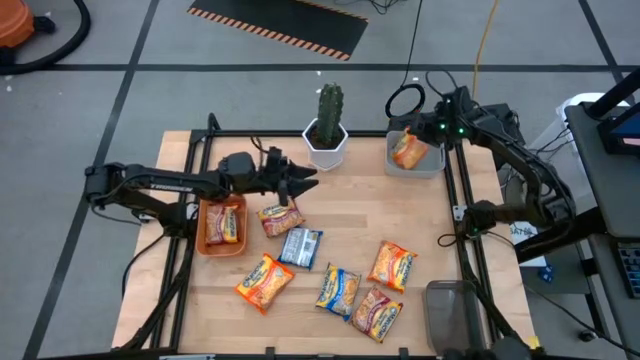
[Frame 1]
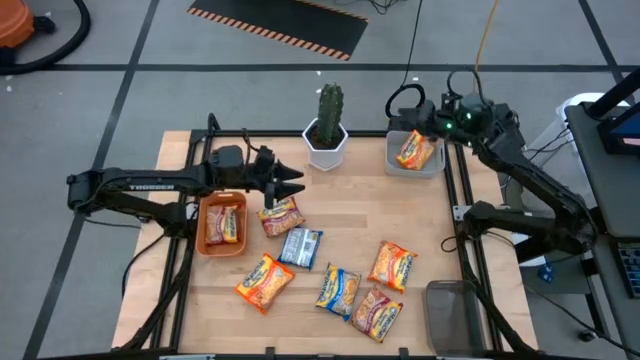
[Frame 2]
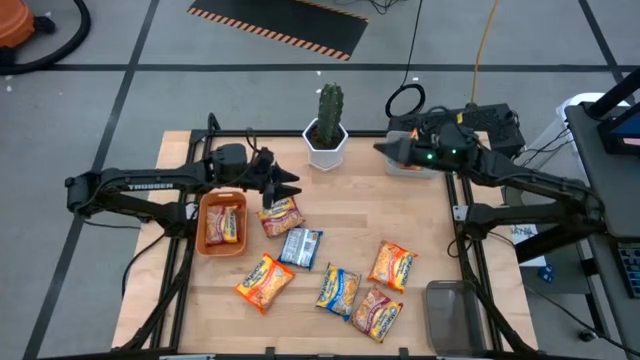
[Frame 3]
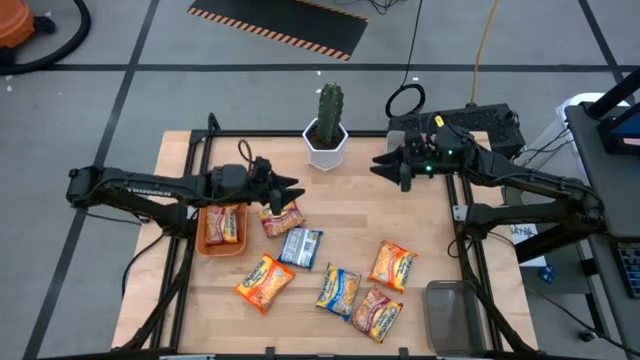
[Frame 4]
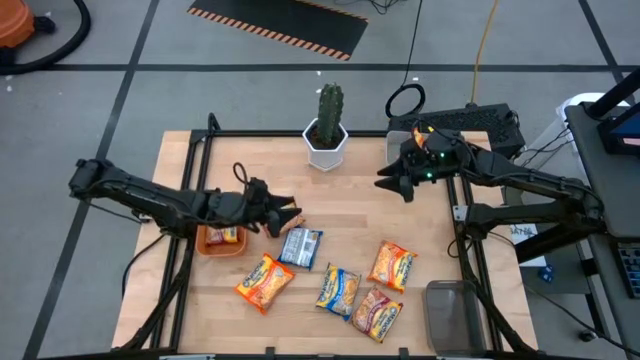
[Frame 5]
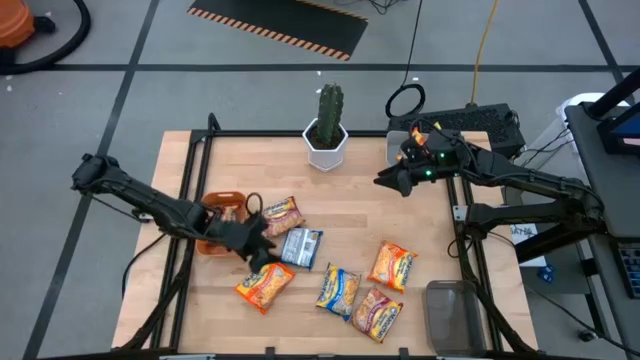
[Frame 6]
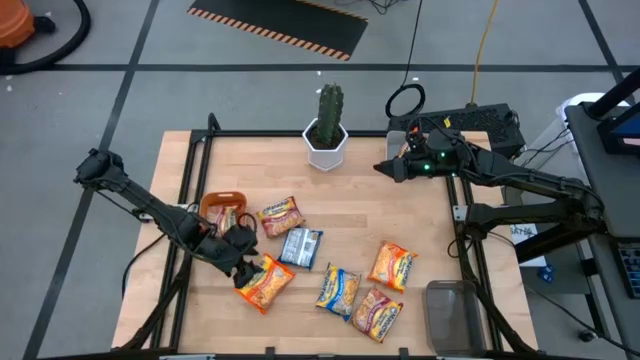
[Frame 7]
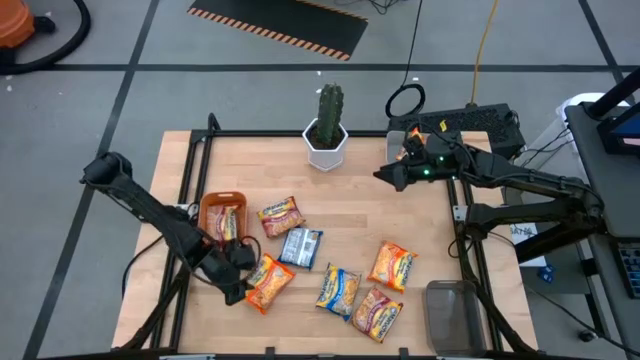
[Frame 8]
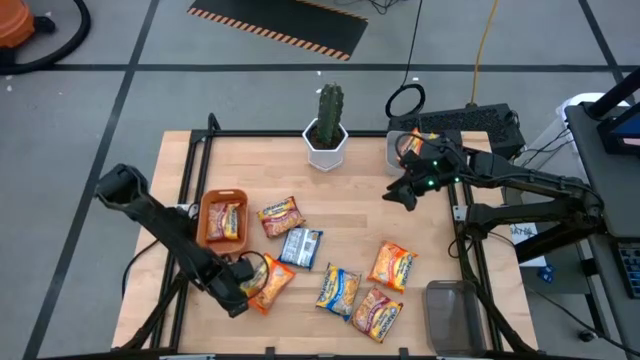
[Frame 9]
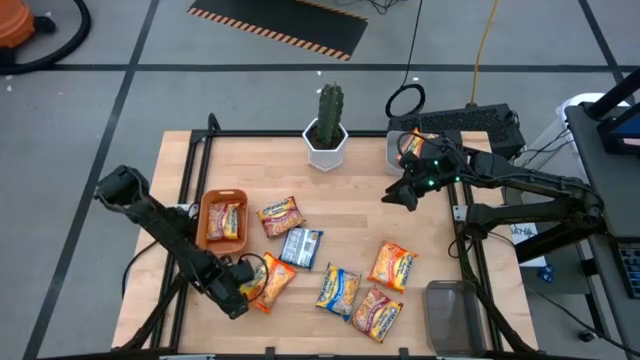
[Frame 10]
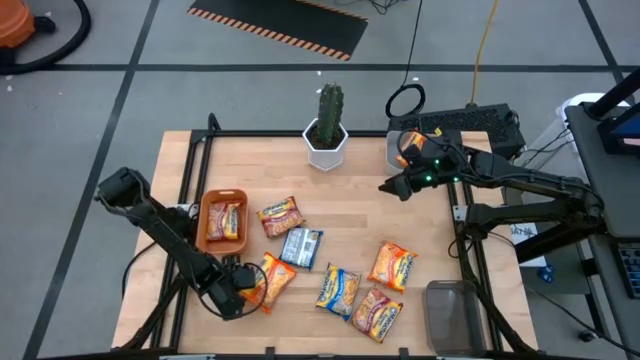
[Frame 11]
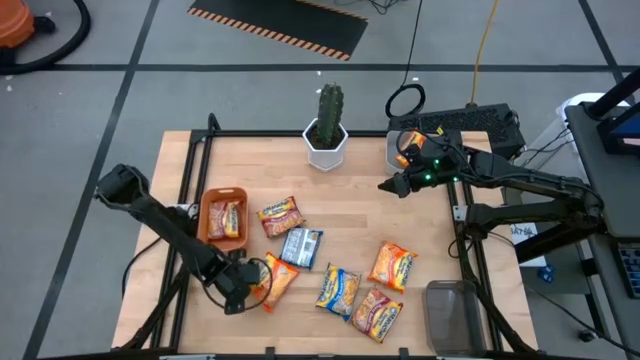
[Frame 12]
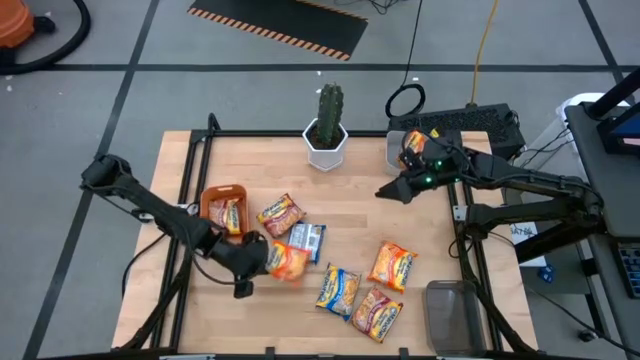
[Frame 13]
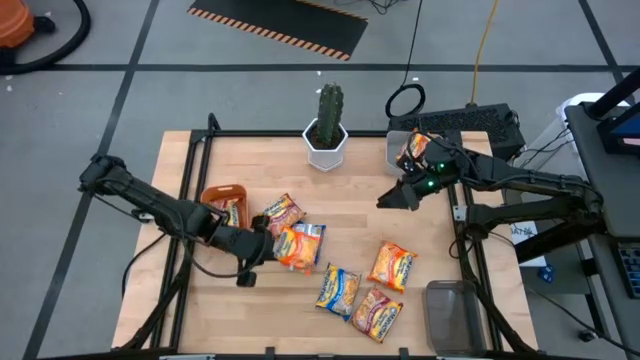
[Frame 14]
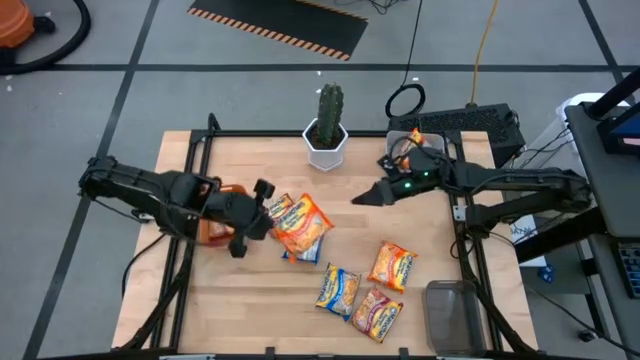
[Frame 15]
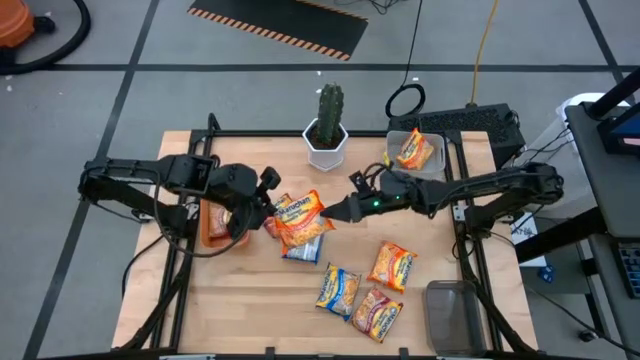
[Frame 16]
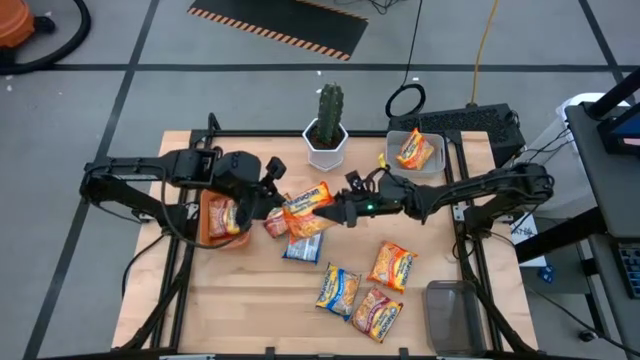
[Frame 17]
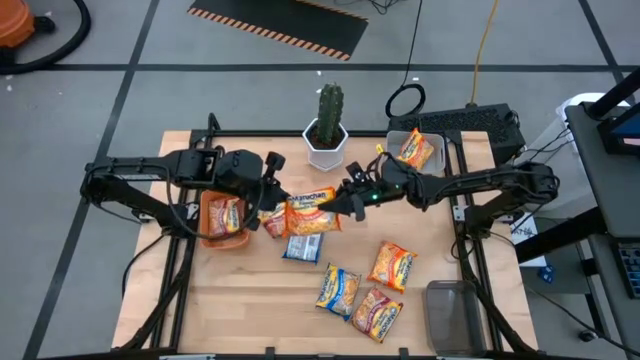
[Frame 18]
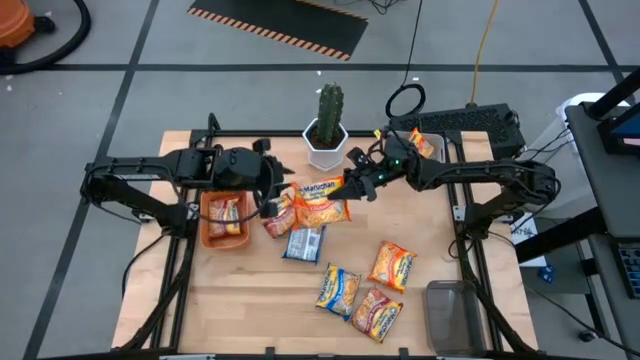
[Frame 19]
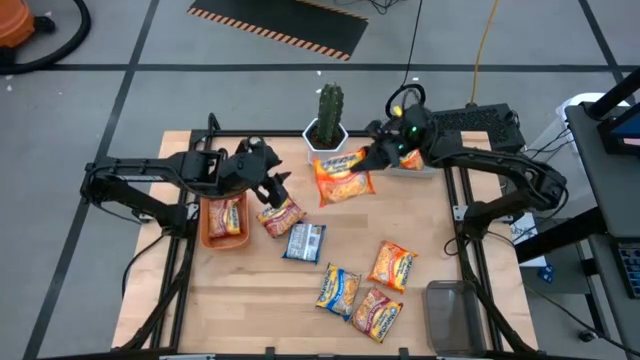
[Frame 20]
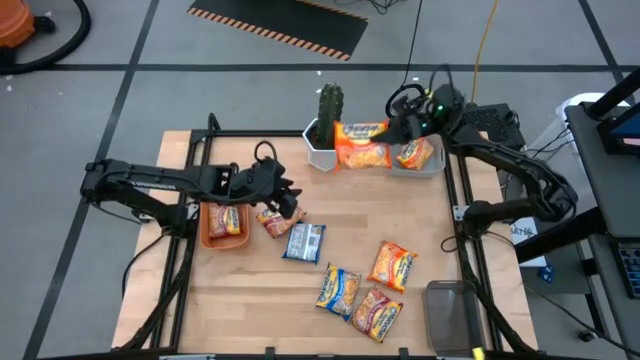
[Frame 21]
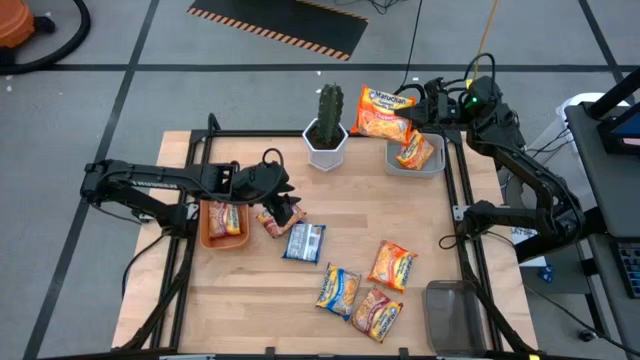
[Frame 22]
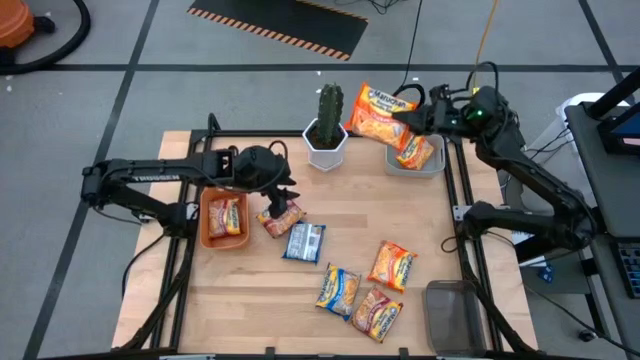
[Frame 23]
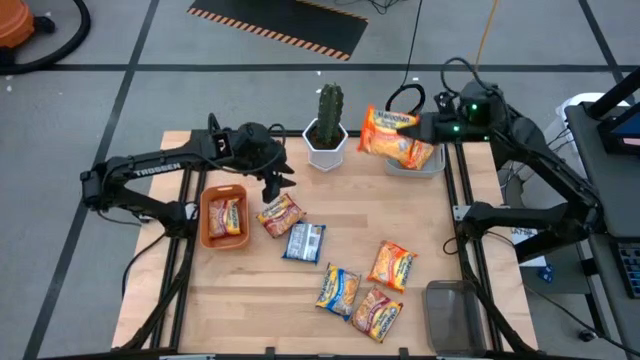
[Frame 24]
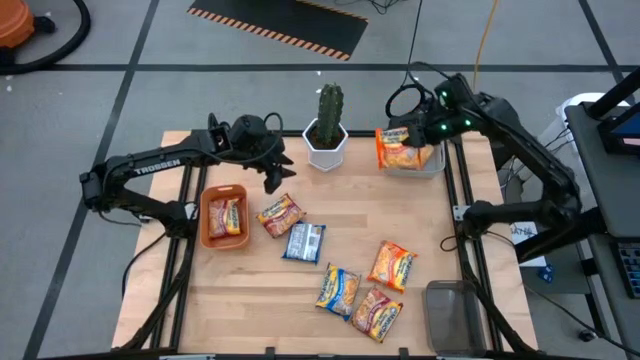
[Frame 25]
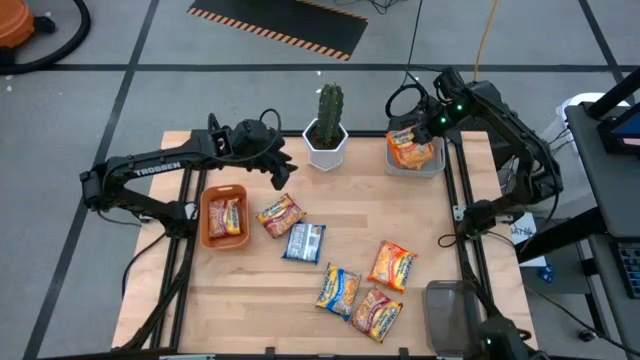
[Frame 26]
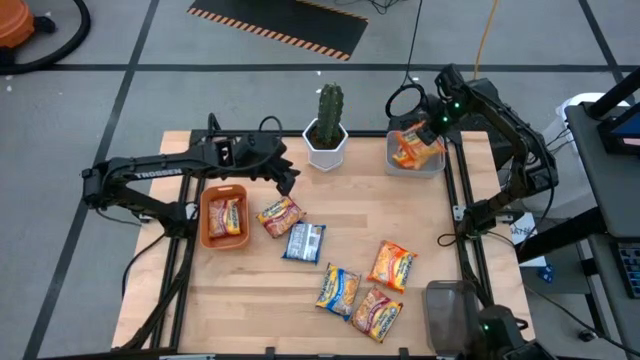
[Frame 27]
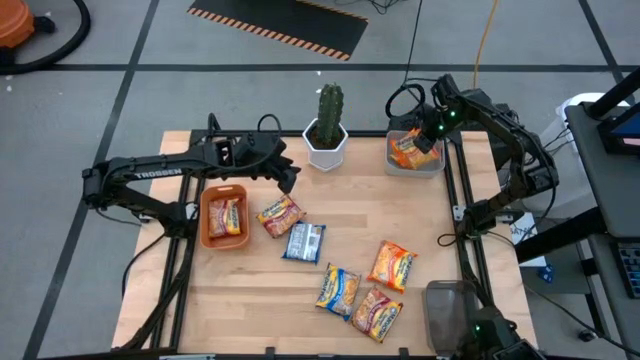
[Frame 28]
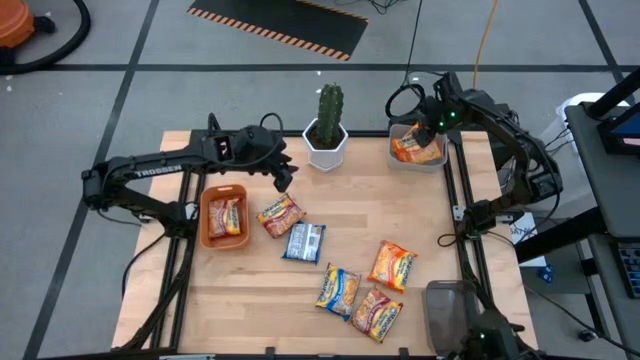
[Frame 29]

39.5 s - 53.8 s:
Task: Sort Maruchan noodles
Put the left orange noodle pack into the gray bin

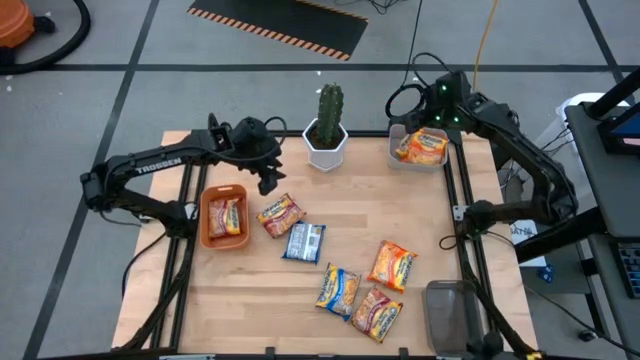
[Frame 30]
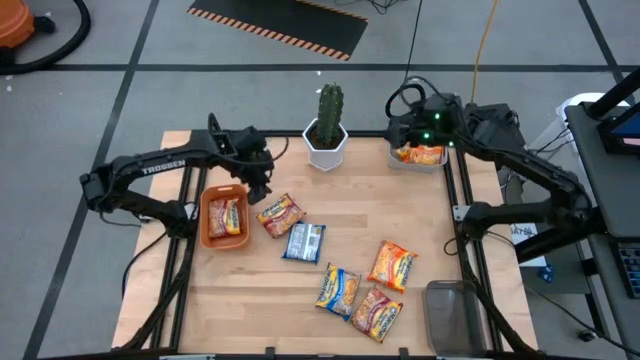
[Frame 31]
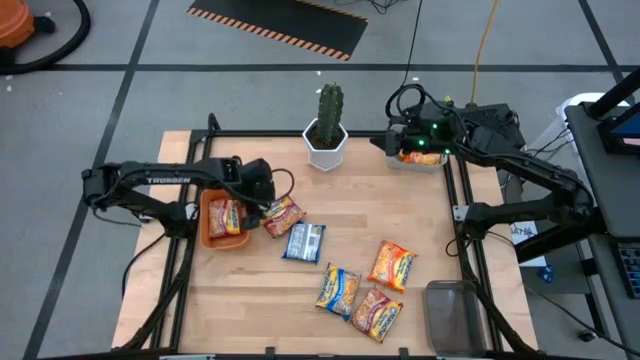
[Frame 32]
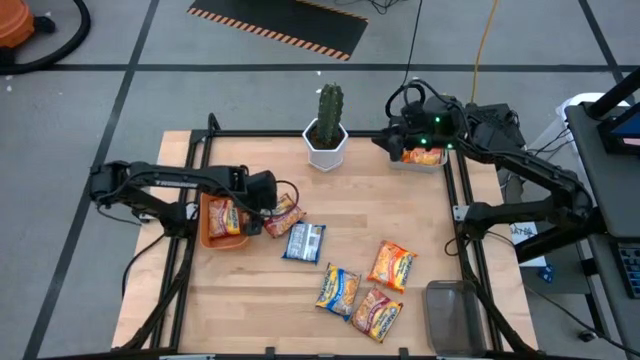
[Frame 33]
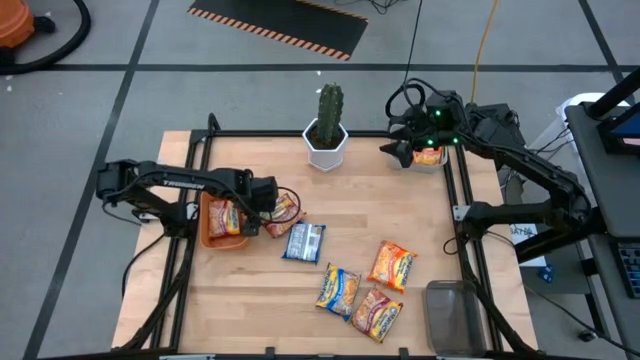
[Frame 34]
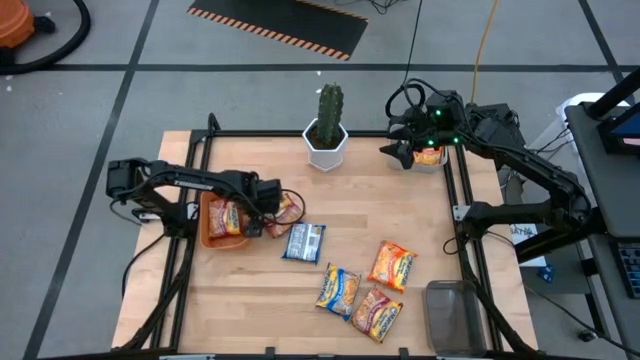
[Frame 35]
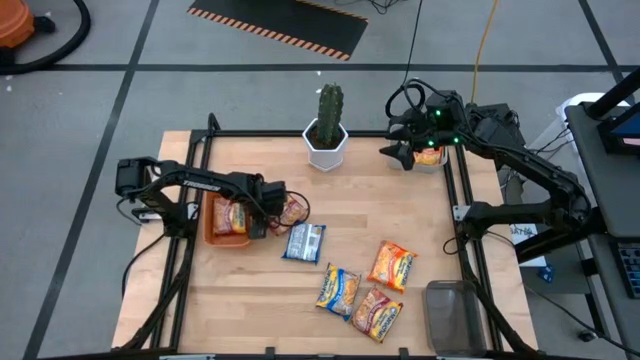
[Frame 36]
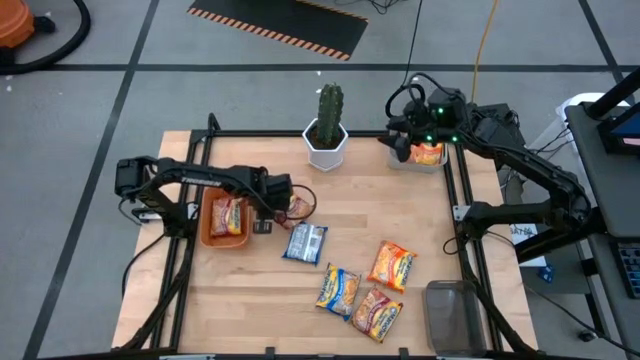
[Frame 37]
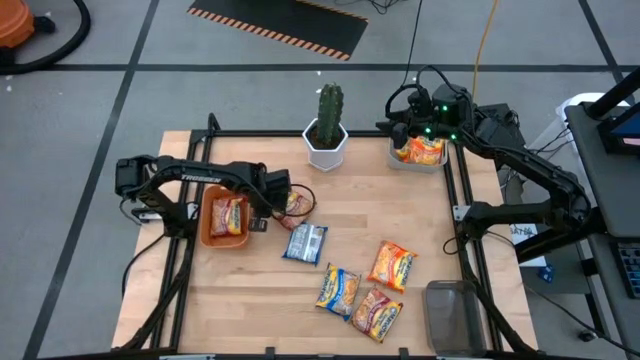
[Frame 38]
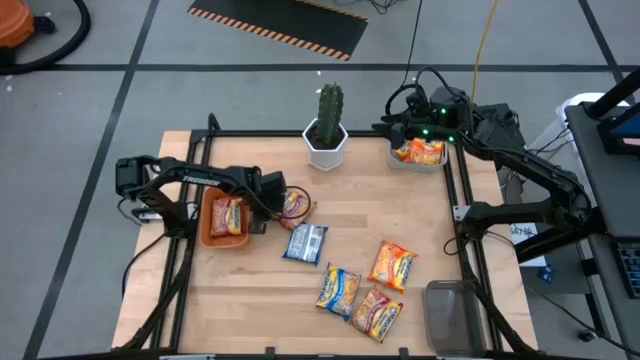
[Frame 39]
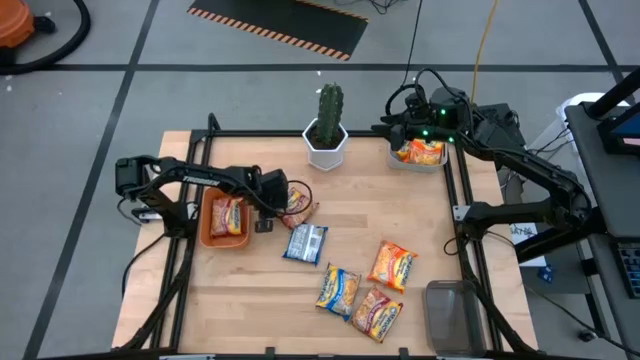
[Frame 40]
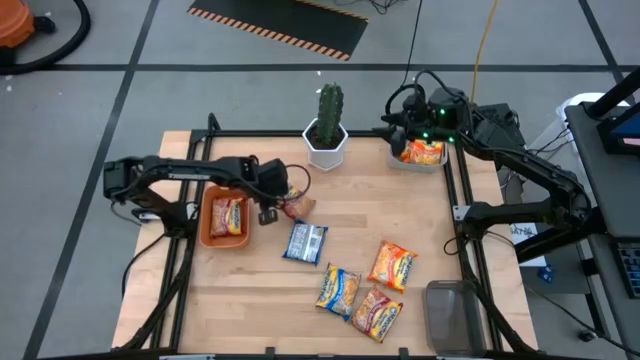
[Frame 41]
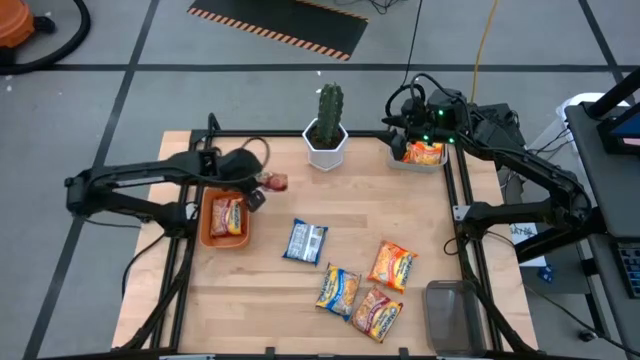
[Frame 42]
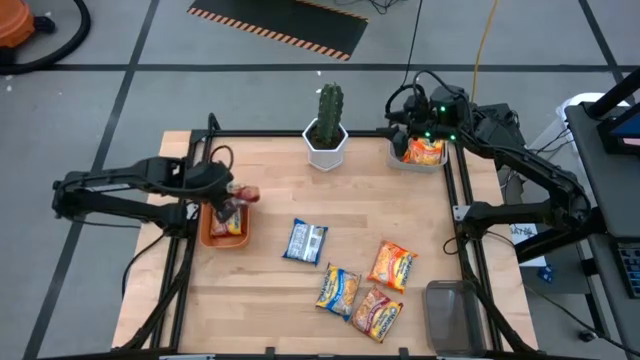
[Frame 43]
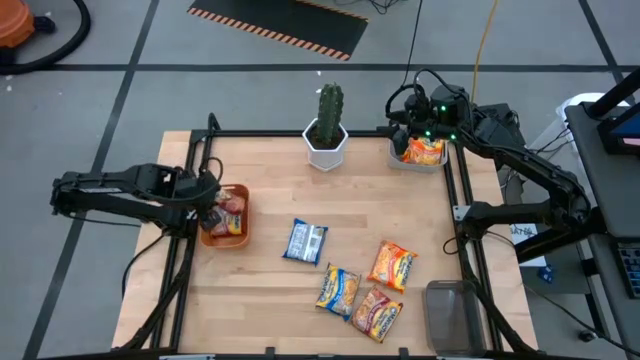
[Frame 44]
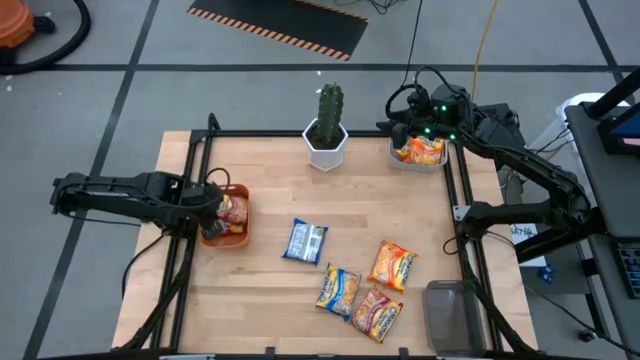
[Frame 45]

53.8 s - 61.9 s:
Put the top red noodle pack into the orange bin
